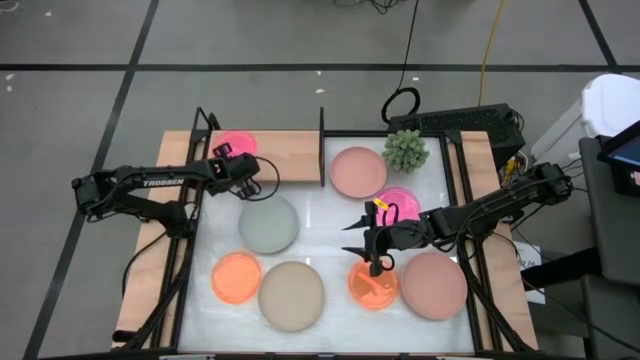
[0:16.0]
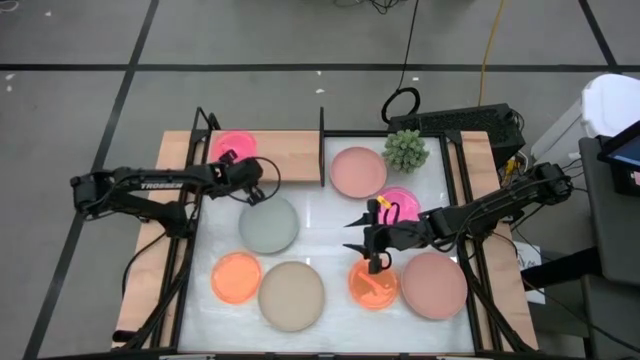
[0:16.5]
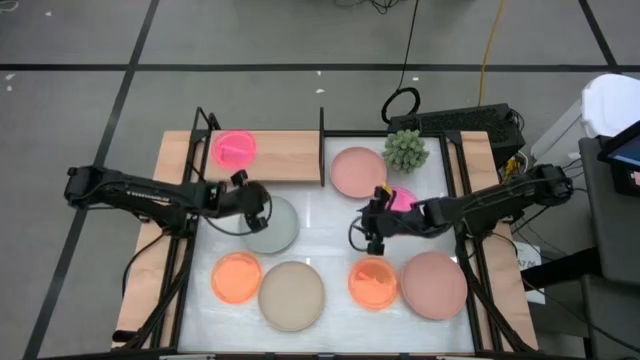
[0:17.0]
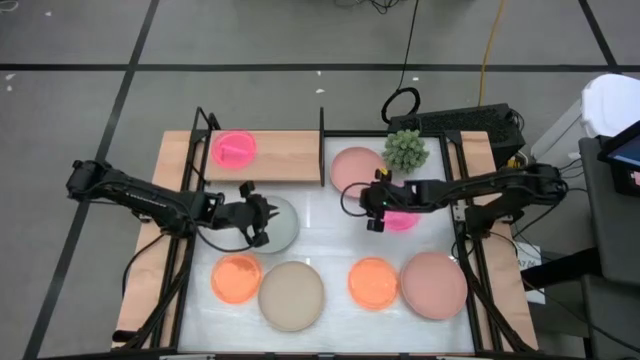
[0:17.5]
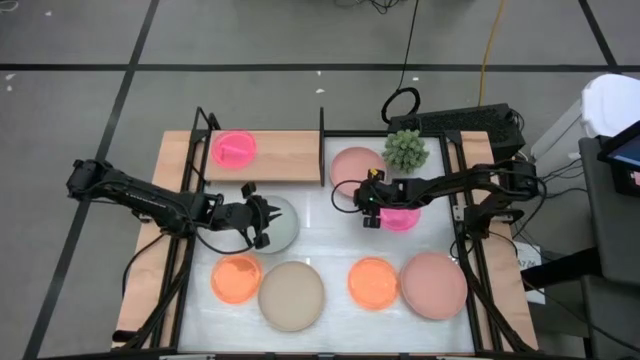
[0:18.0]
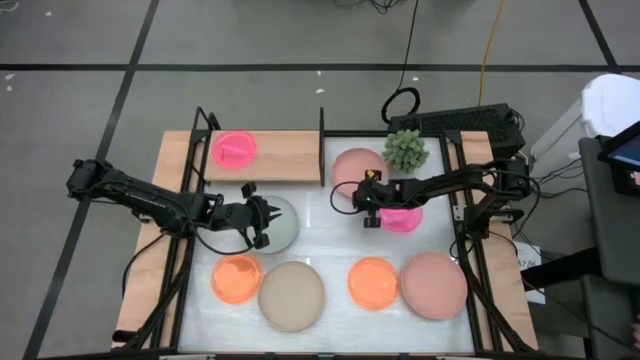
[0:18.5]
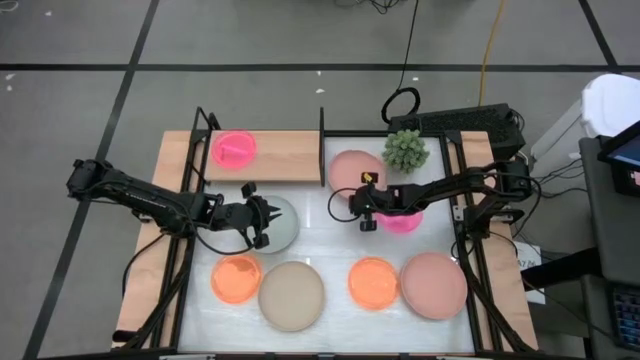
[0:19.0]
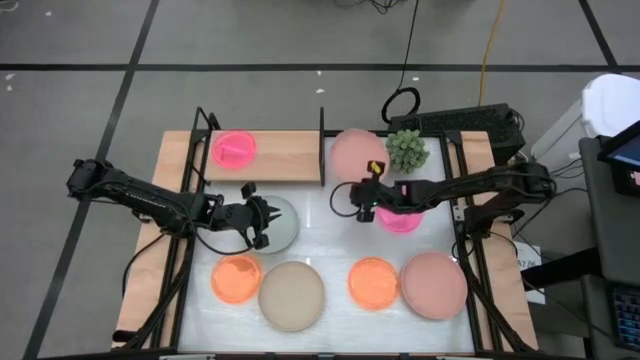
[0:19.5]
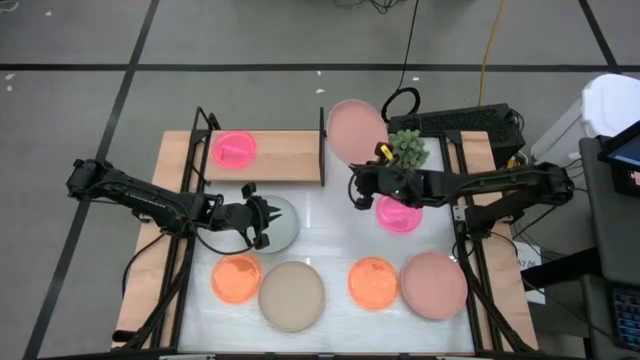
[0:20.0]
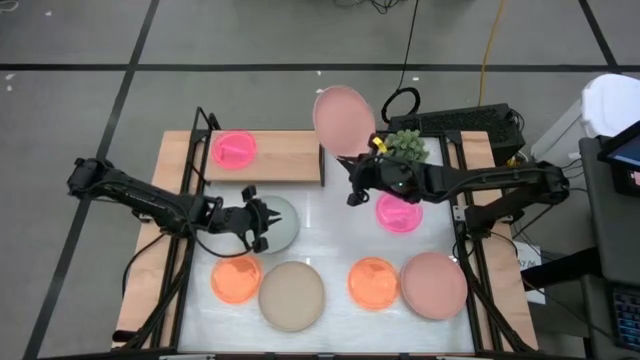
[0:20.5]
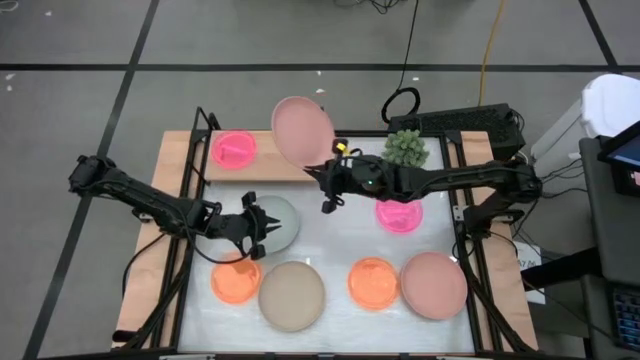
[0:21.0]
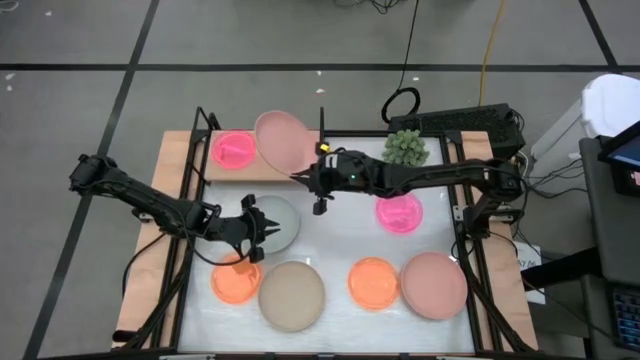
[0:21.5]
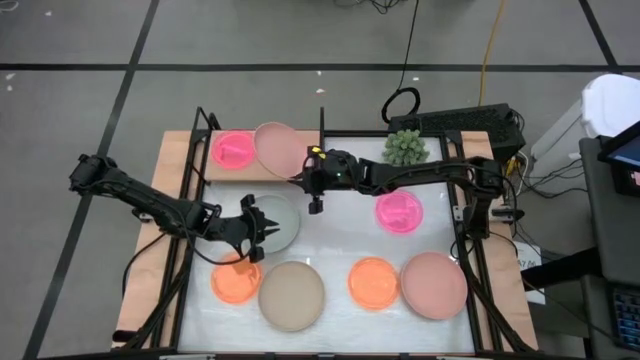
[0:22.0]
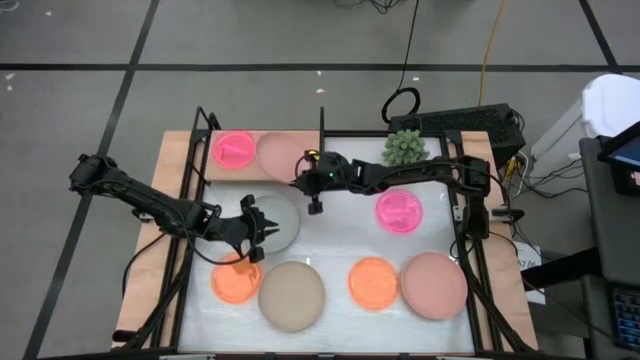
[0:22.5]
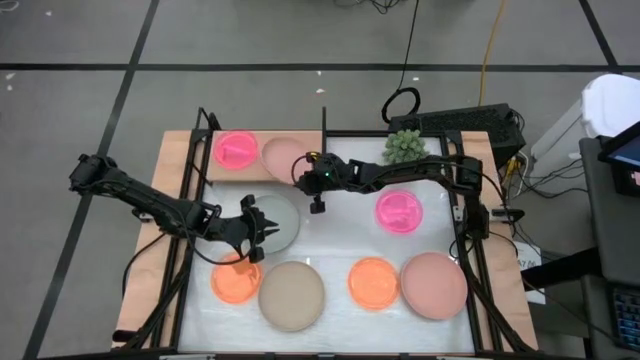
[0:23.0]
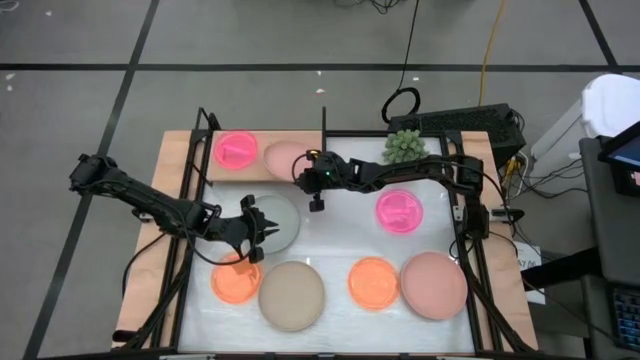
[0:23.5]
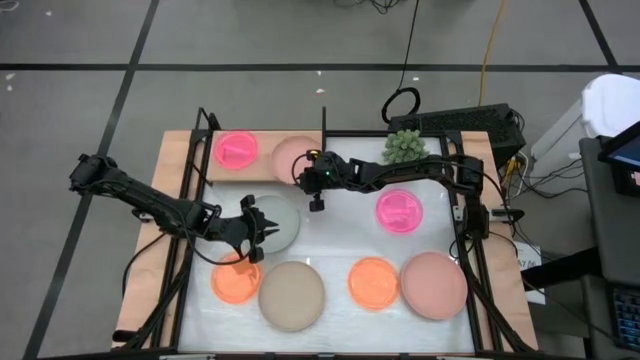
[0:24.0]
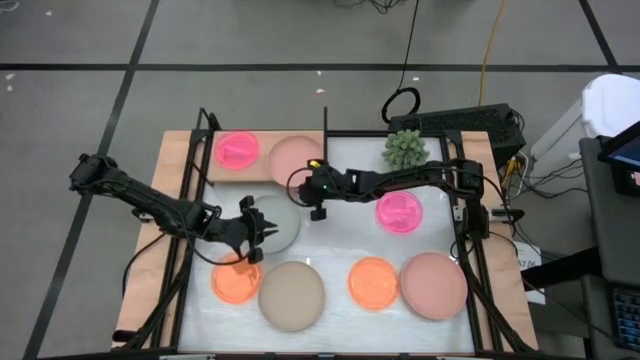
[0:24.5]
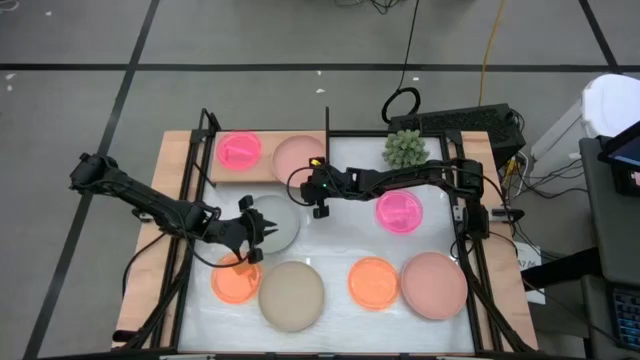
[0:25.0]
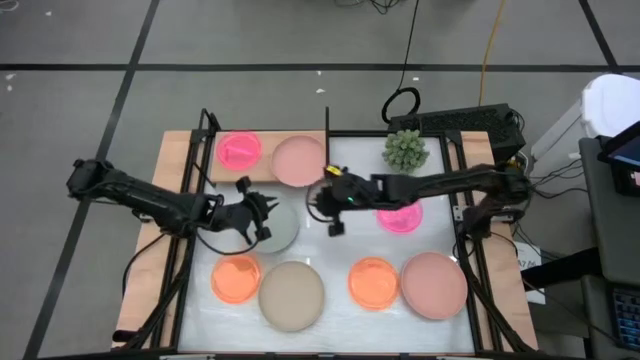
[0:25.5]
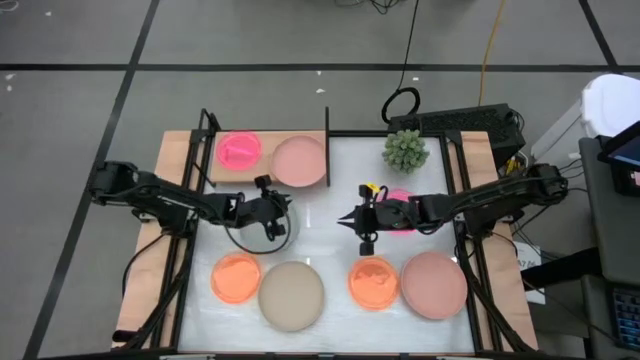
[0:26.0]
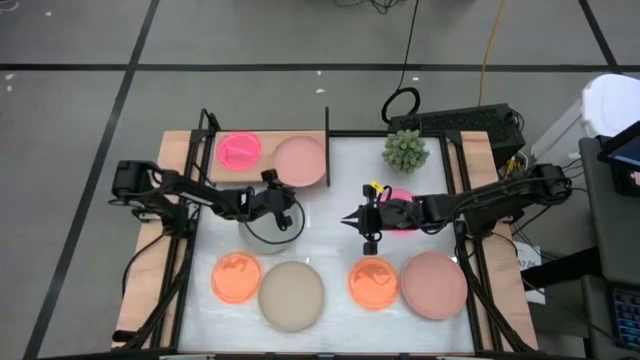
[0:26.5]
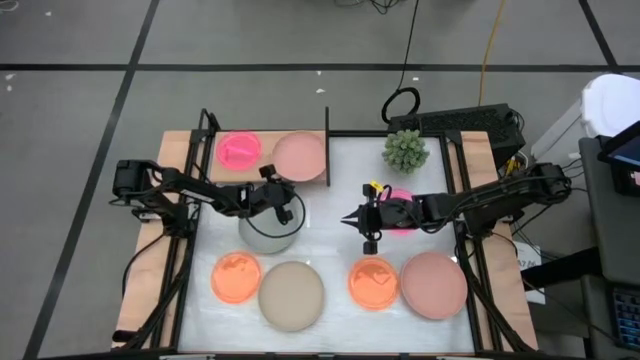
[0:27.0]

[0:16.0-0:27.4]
Task: Place and stack plates onto a shelf
Put the top brown plate on the shelf

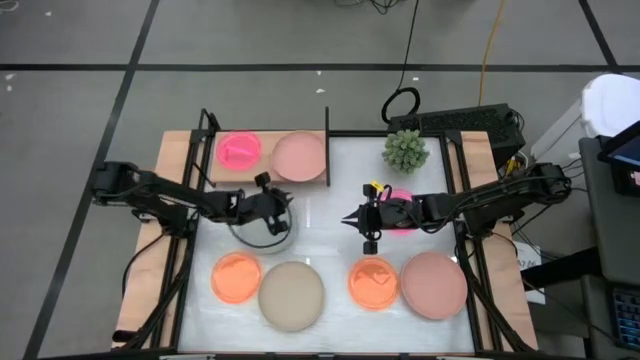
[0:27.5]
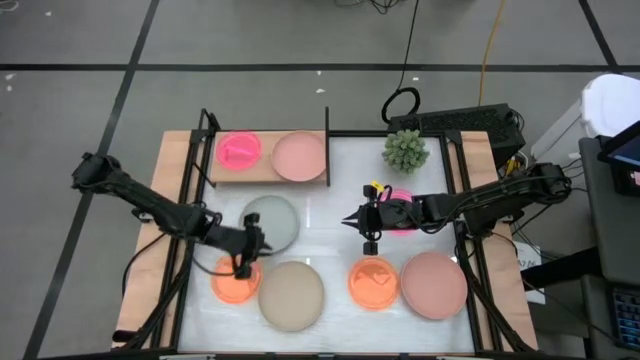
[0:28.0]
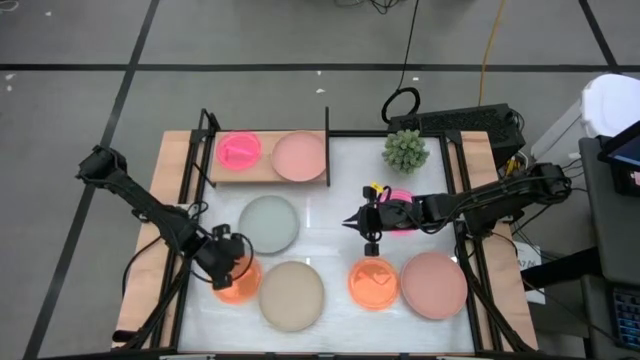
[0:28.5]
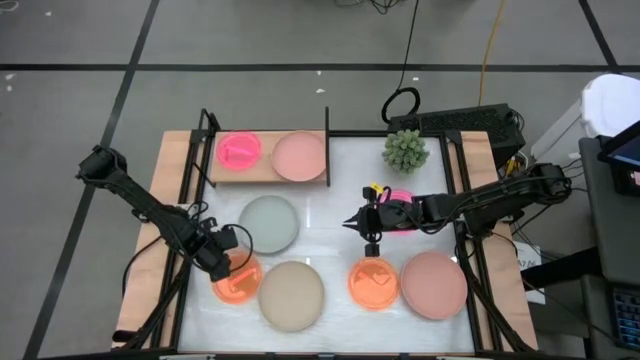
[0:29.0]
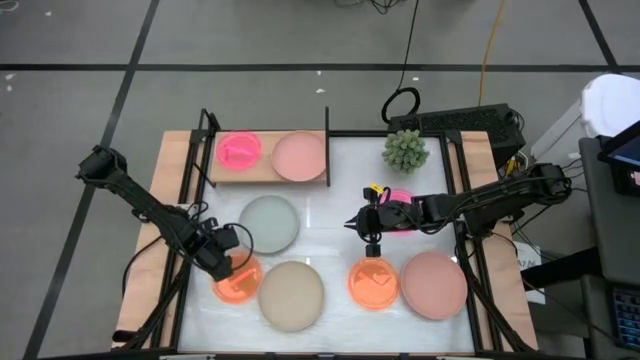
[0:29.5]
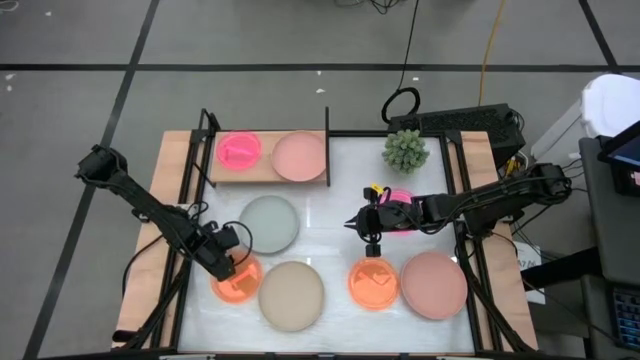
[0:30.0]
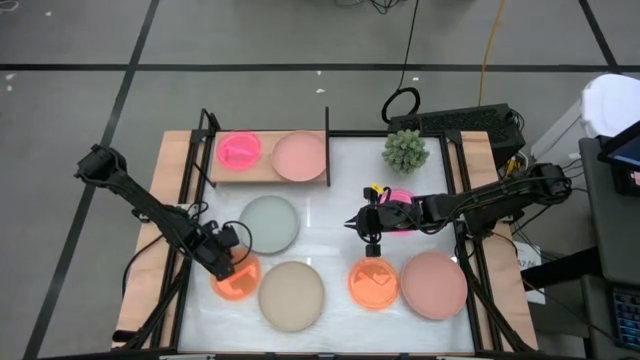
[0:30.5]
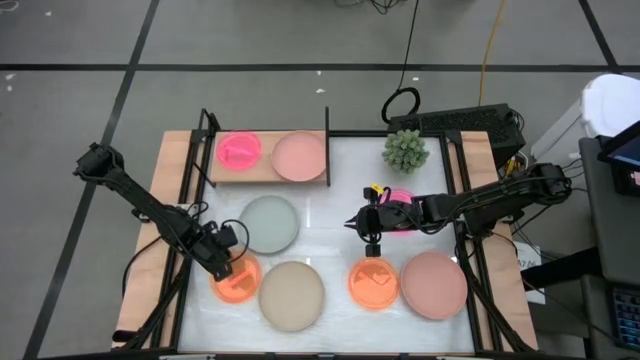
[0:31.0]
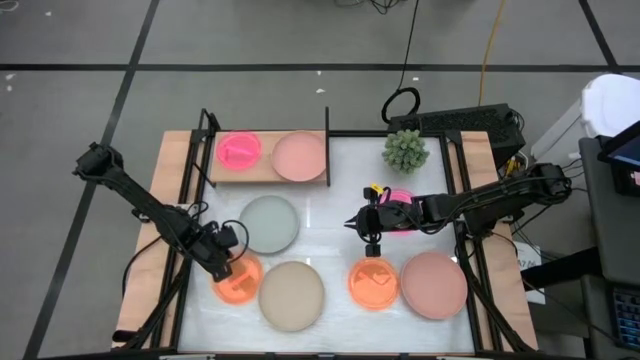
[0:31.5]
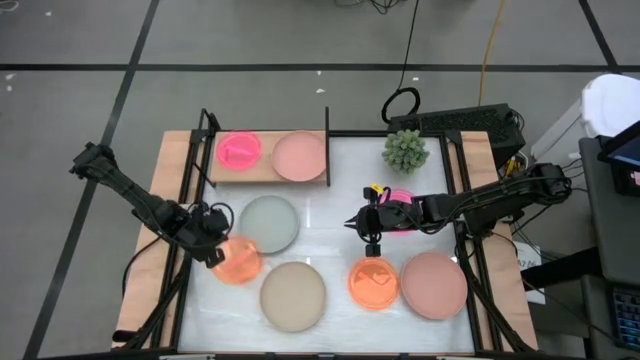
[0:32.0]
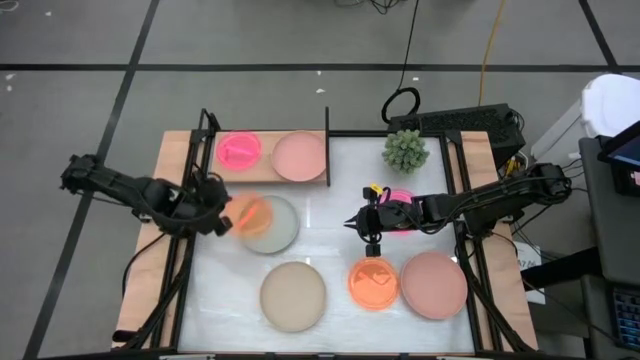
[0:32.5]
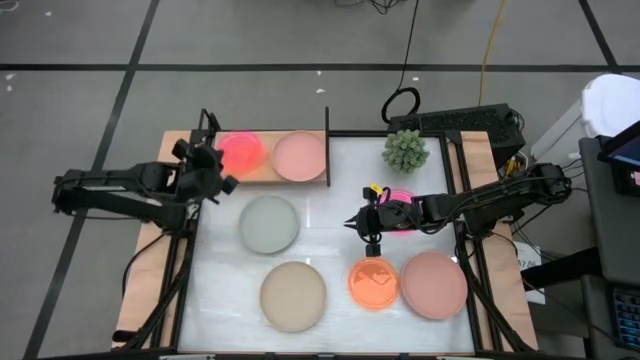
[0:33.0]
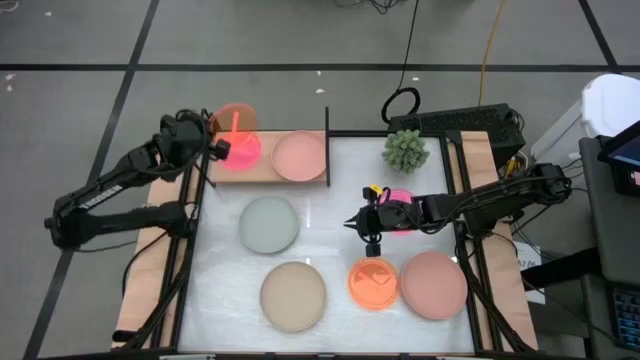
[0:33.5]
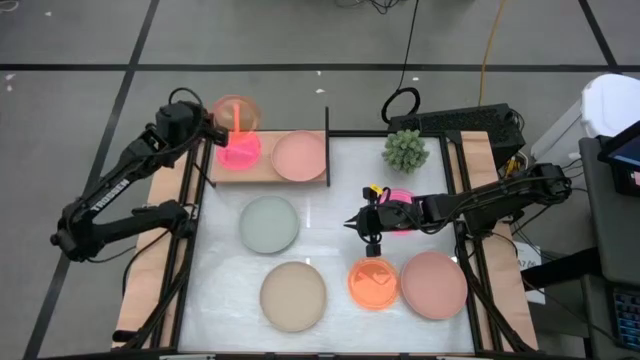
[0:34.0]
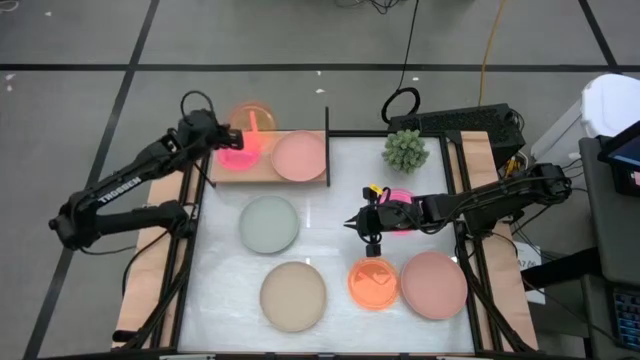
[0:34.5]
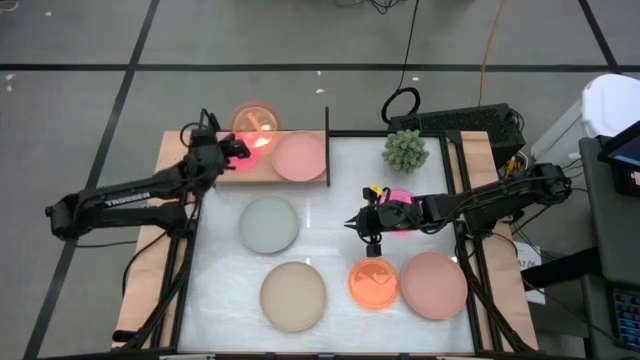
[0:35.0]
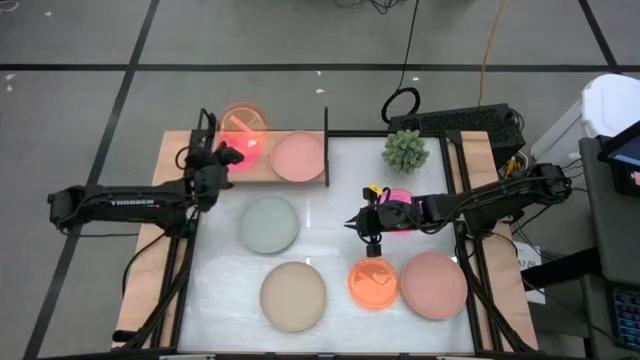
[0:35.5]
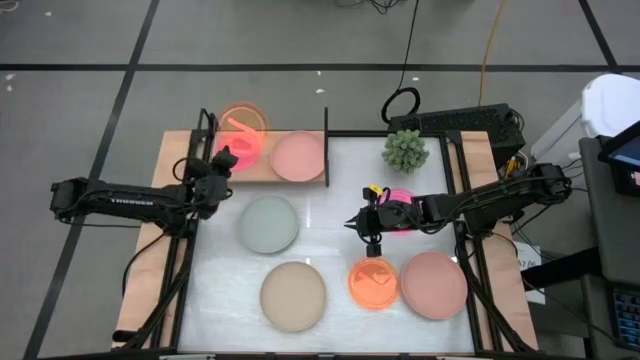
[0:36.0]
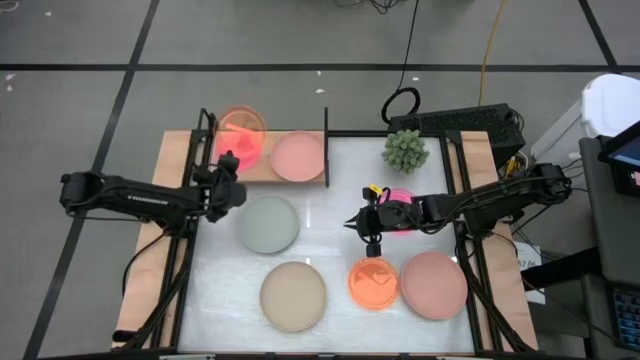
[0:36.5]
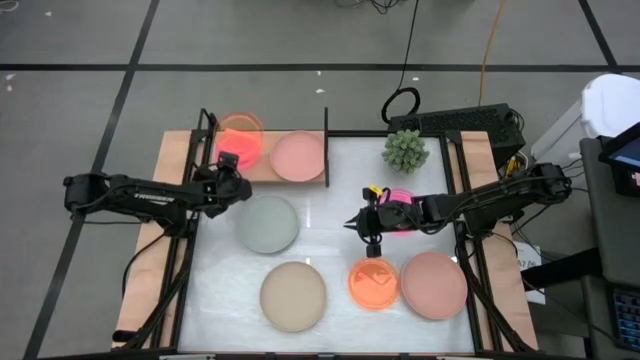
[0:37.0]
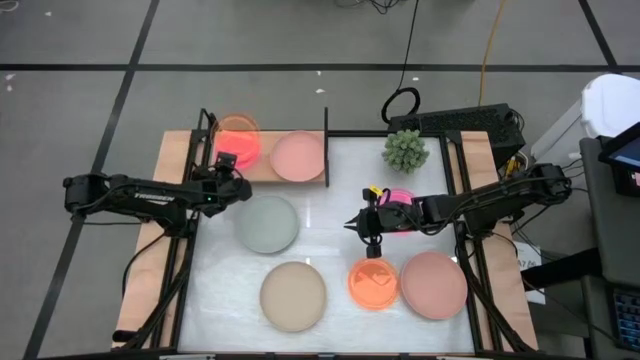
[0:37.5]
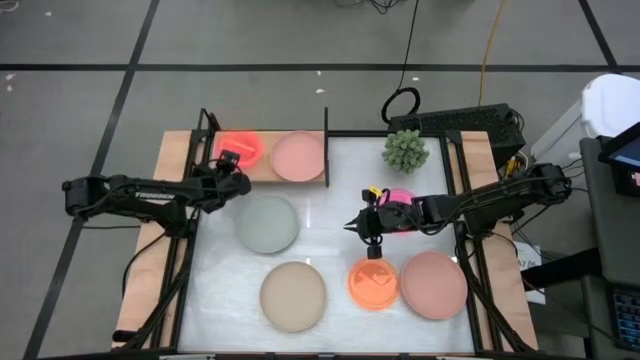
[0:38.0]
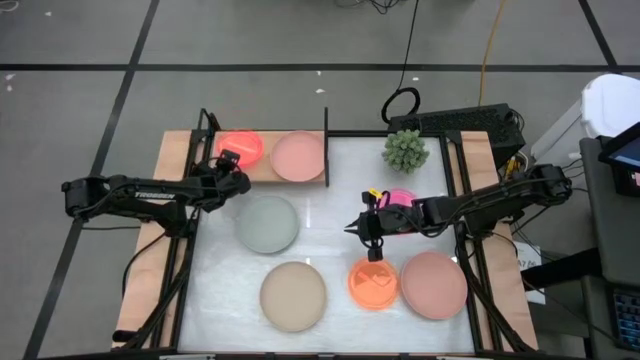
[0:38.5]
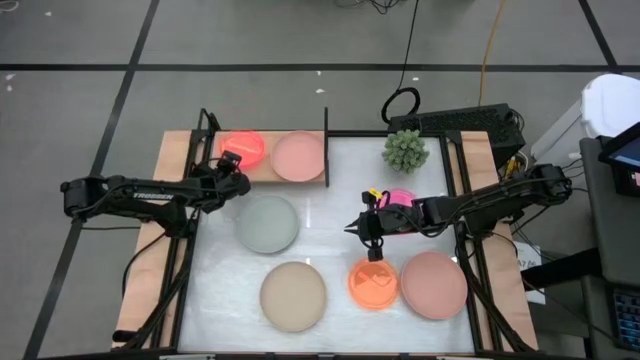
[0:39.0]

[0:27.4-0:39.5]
Stack the left orange plate on top of the pink plate on the shelf
